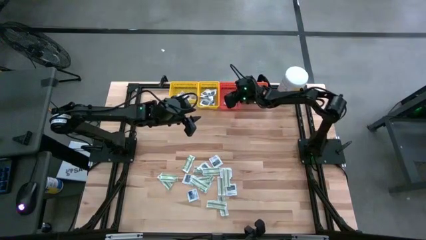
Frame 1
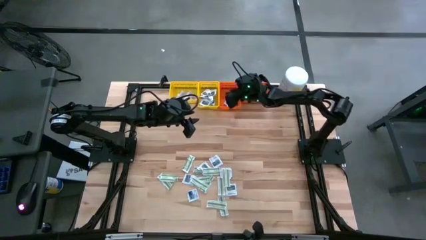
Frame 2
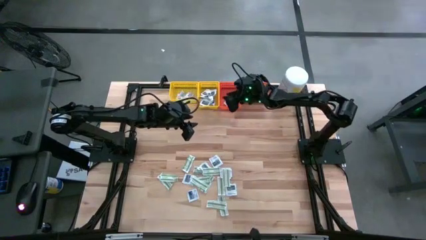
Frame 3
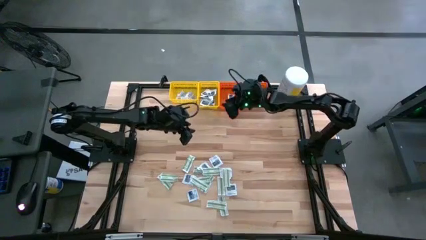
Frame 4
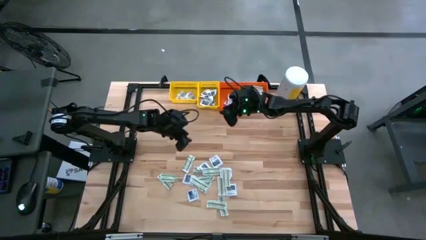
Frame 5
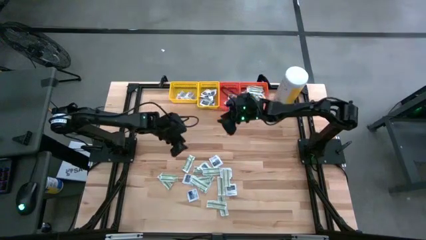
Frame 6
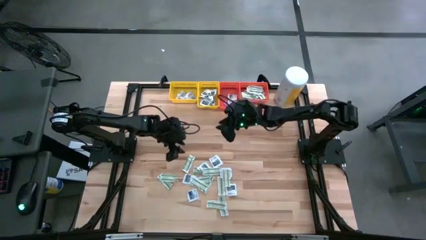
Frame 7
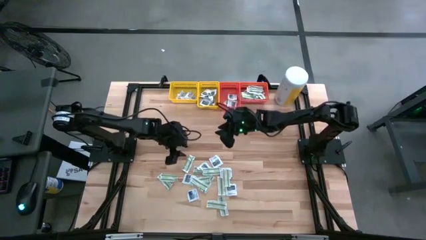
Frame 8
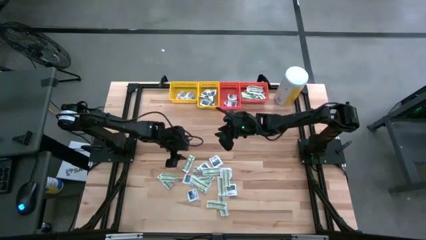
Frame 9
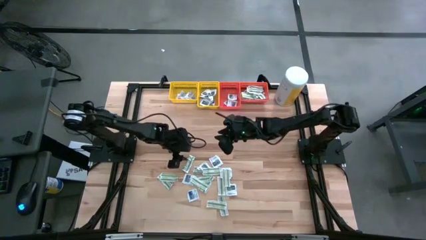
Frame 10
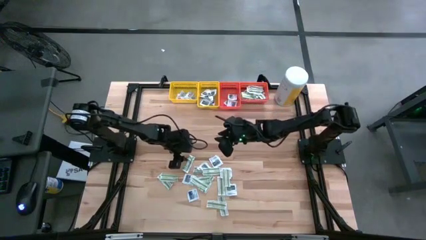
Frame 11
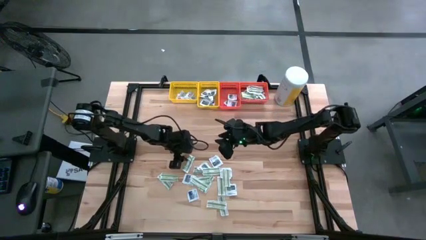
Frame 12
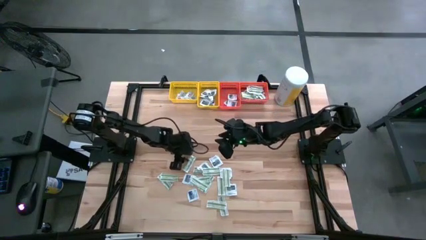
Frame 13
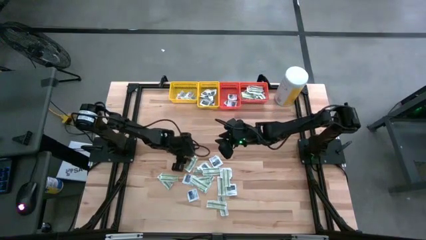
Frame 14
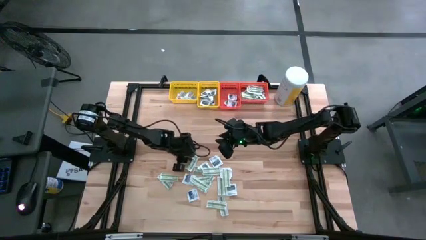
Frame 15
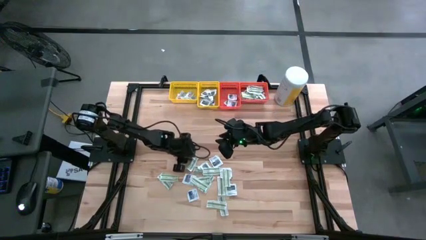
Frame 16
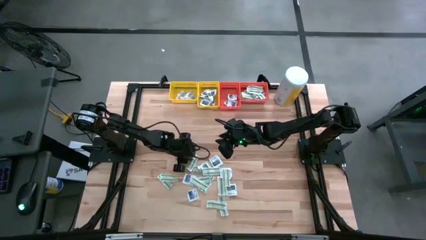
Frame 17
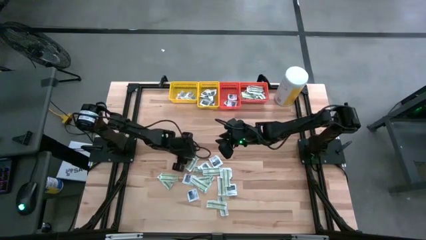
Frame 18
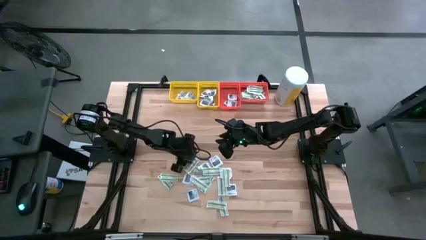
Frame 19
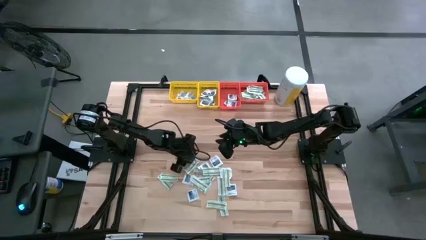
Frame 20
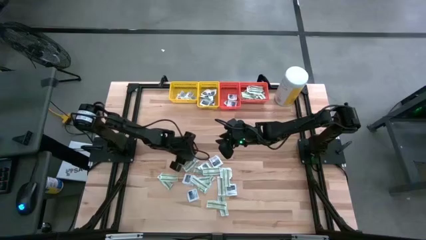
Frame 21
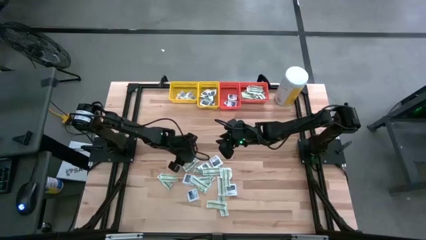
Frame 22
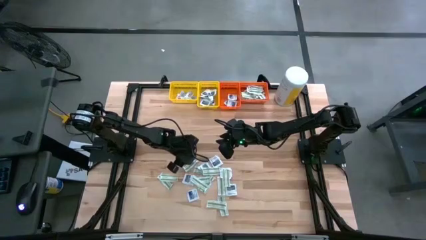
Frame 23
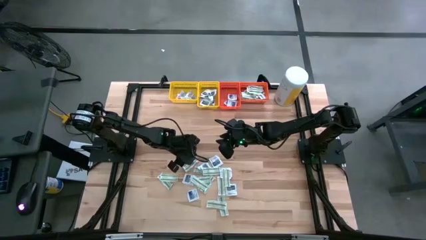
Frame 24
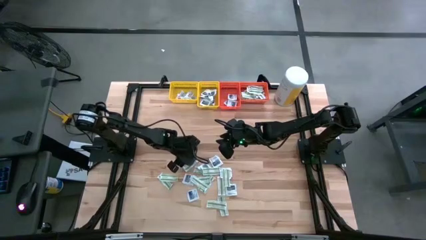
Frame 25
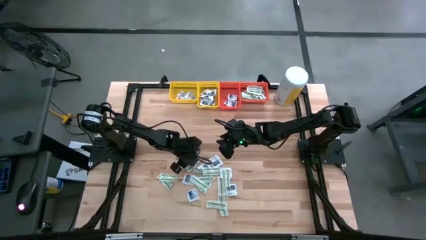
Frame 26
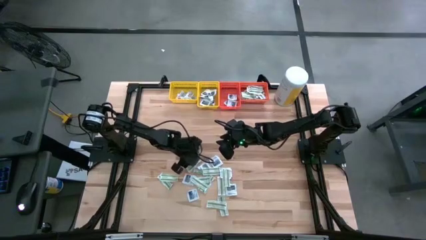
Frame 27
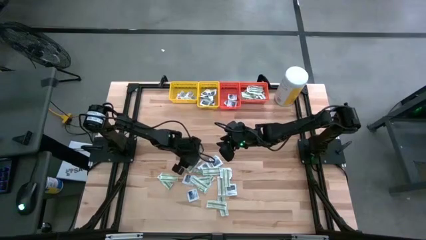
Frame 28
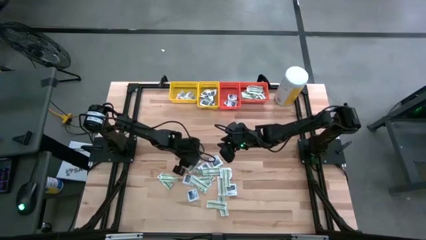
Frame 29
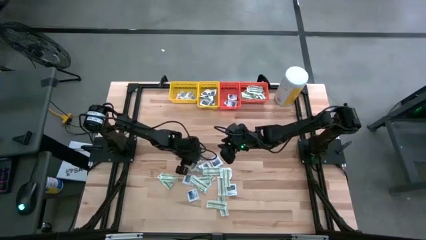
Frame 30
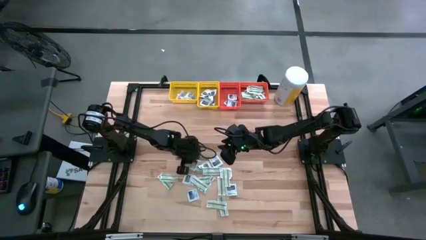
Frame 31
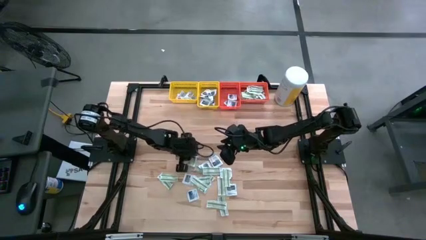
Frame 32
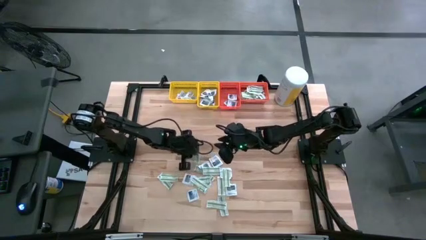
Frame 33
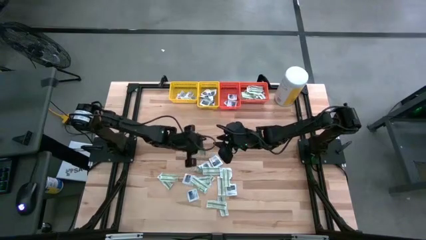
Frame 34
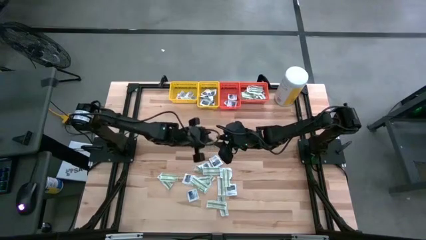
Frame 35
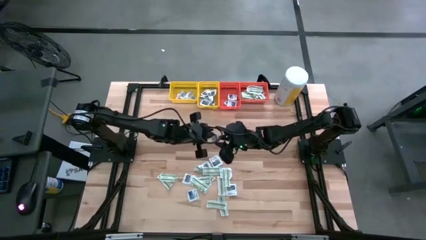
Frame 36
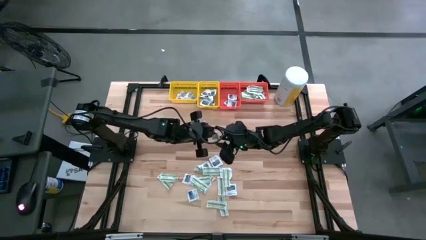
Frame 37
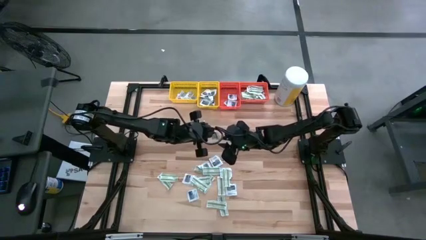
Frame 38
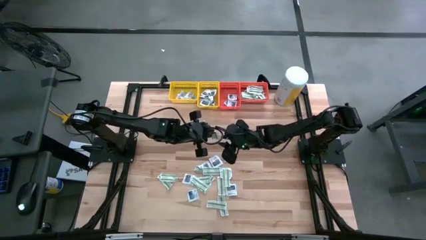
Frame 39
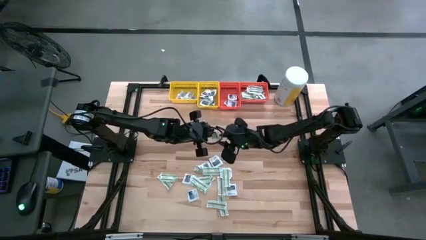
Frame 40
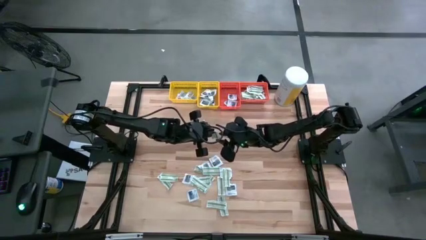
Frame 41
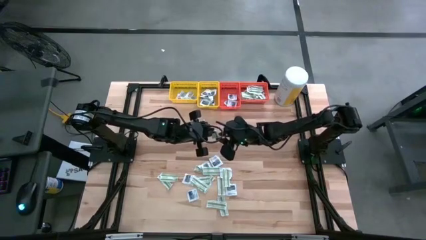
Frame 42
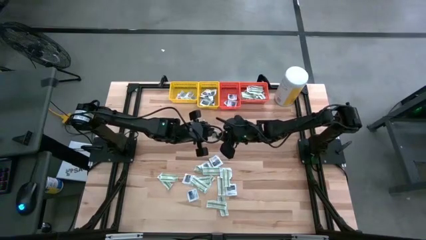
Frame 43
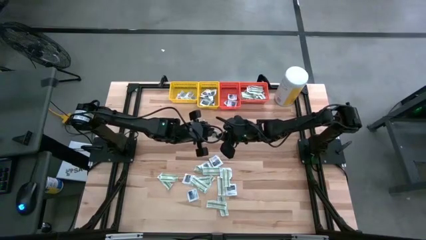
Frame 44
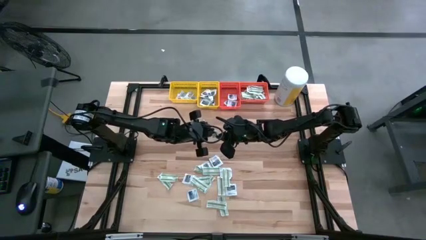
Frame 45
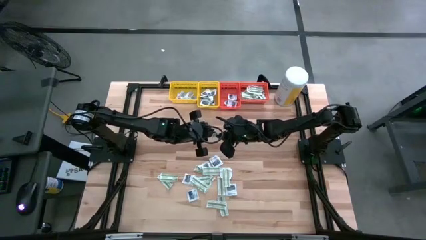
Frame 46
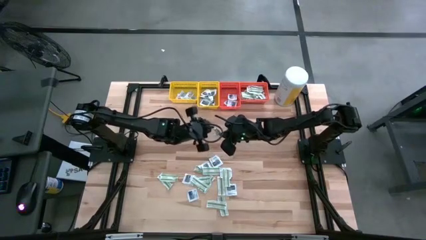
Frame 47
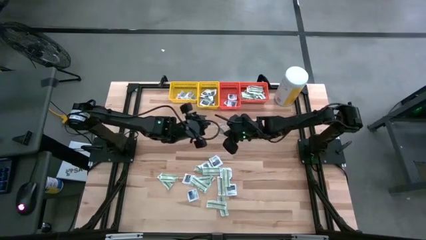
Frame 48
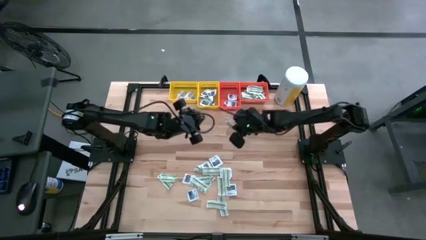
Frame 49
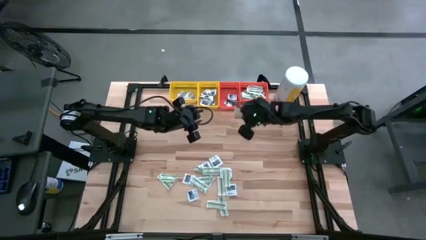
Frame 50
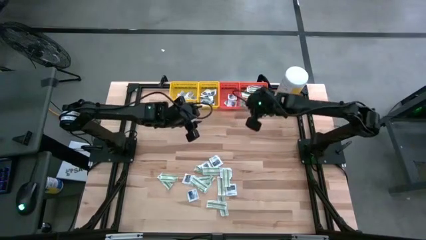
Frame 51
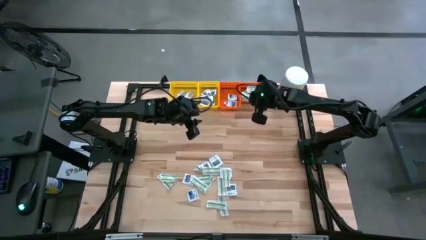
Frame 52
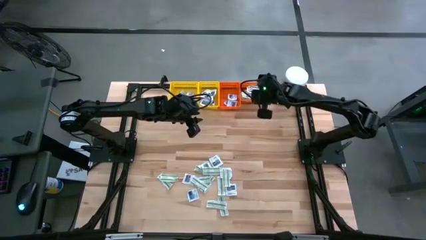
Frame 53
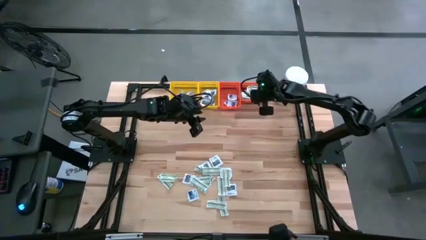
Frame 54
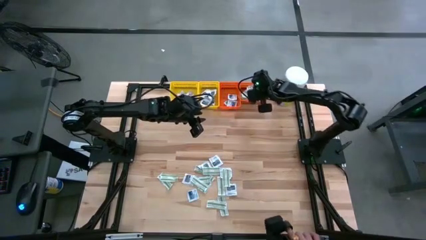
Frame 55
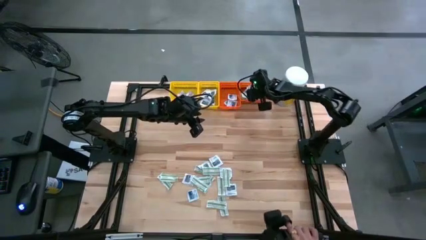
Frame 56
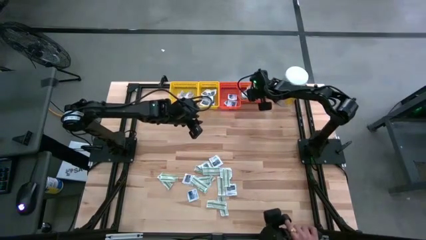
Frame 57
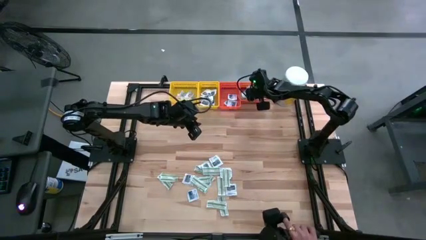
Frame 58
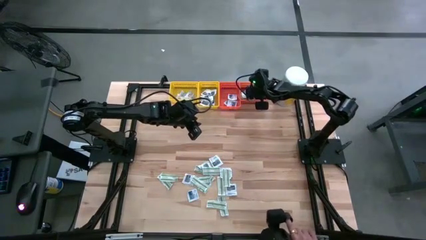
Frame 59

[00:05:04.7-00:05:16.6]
Task: Pick & Place First Aid Supplies
Put the green pad into the right orange bin

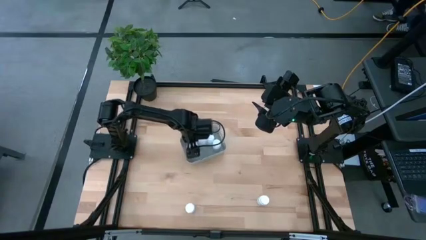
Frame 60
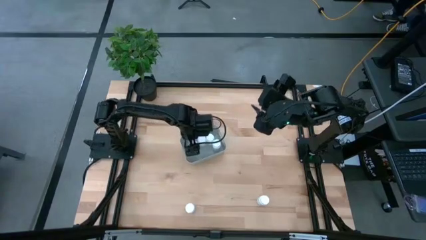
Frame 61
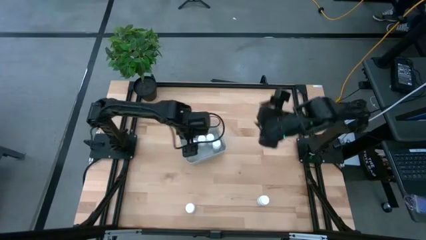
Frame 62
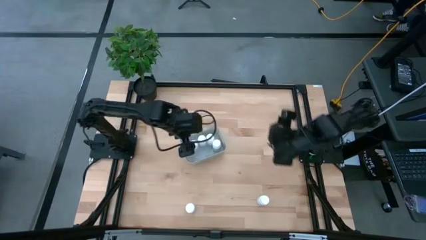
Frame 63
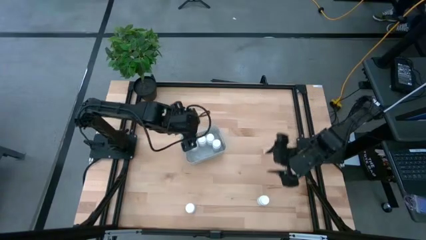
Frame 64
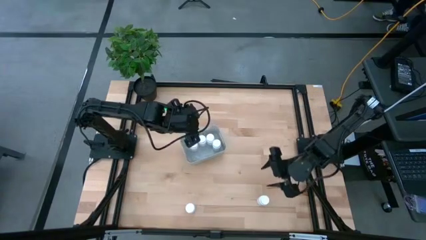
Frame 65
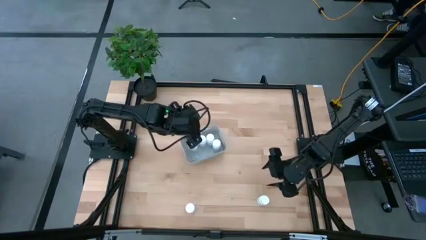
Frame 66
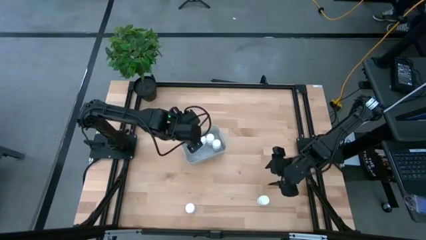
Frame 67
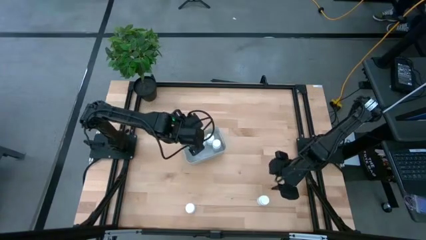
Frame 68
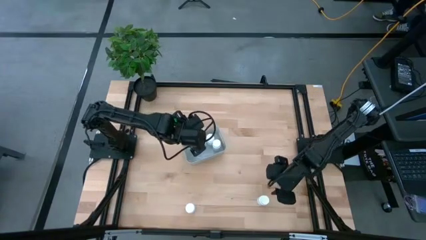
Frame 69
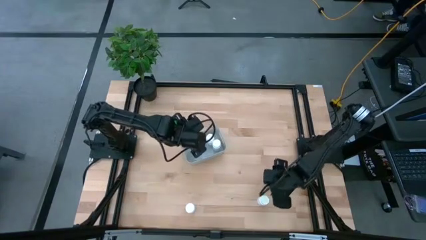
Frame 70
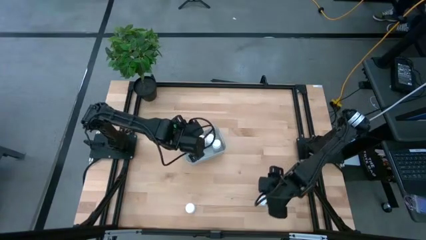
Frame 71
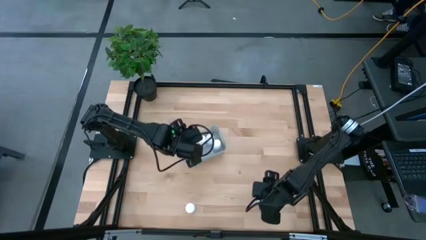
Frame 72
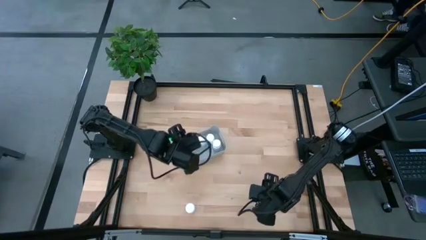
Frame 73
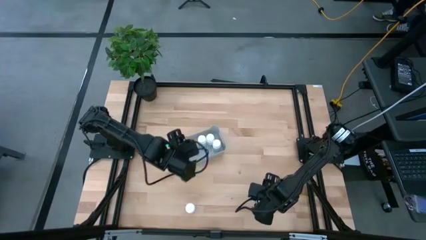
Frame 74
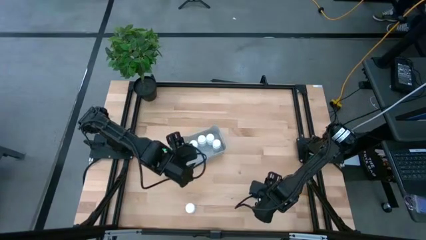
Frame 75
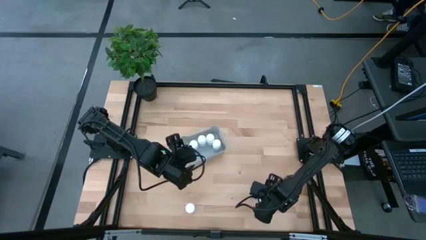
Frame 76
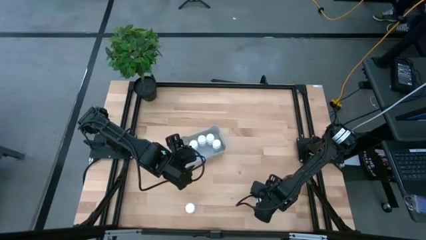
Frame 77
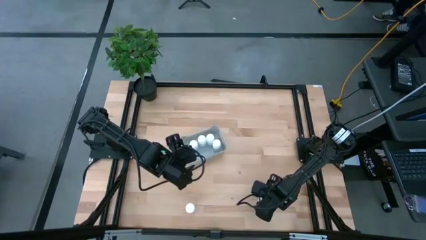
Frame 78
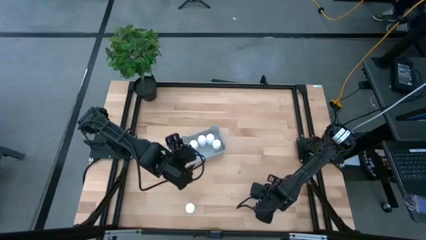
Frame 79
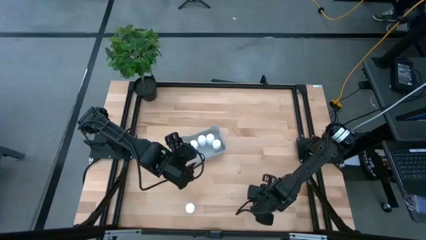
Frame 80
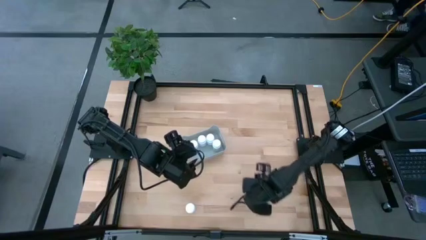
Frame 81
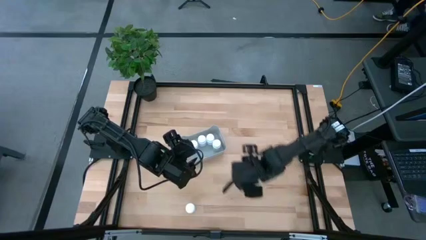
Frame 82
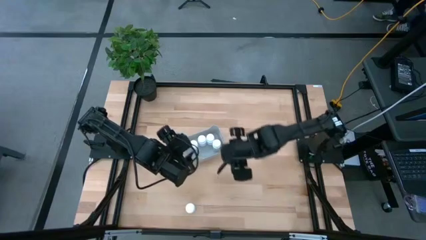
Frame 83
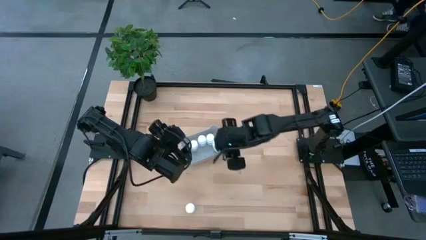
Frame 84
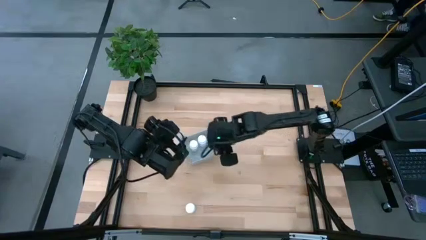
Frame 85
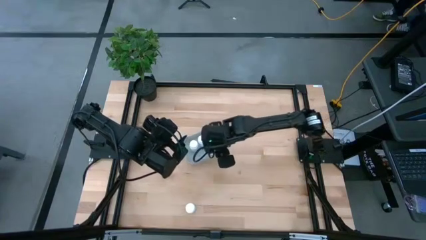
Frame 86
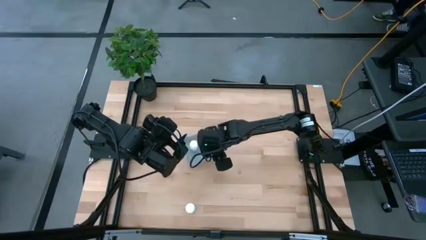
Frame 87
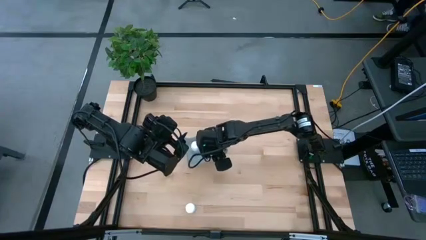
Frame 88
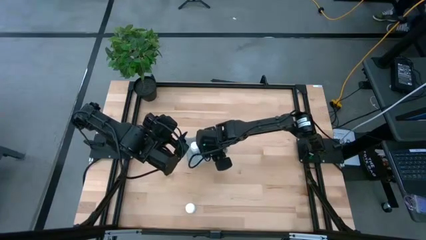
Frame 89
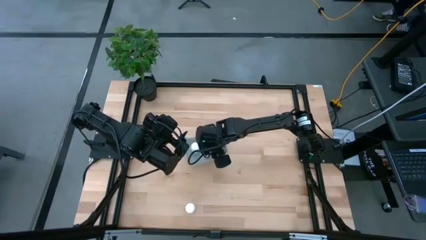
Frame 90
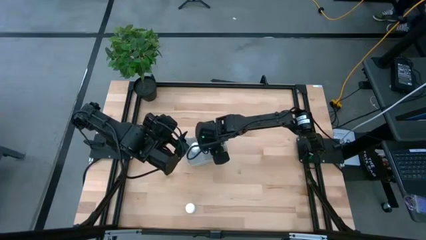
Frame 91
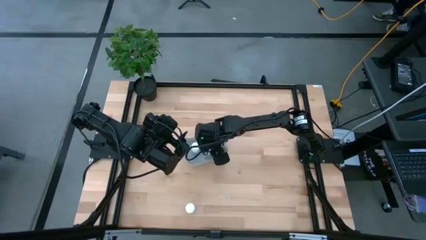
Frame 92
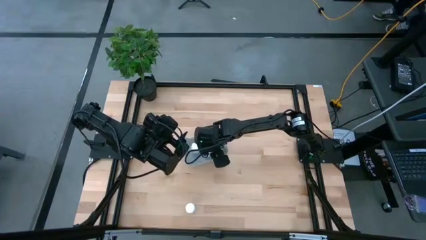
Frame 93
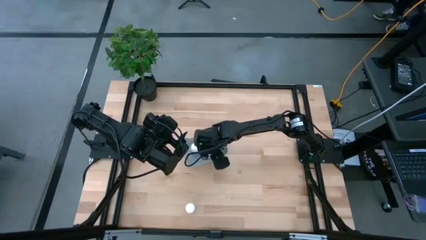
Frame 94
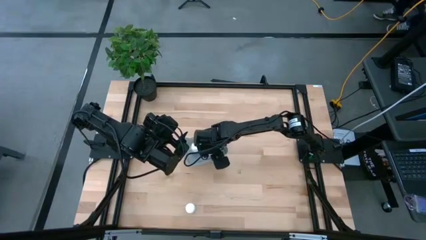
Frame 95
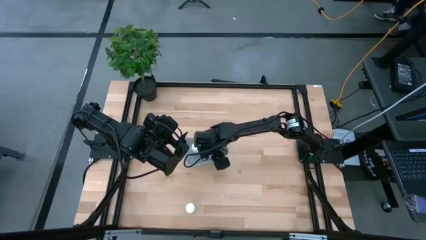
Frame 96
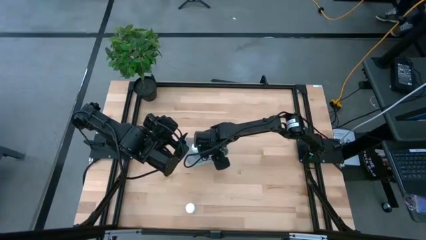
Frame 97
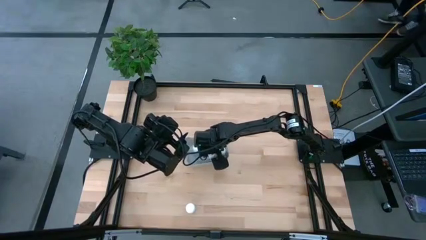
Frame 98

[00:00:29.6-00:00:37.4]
Task: Pick and place pill bottles into a basket
Put the white pill bottle into the white bin
